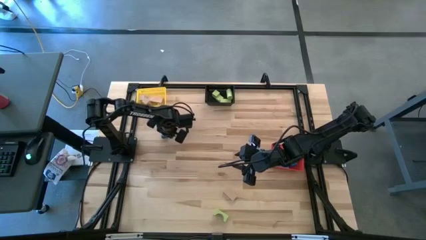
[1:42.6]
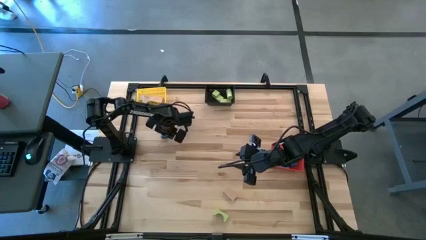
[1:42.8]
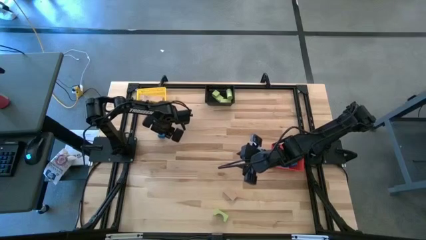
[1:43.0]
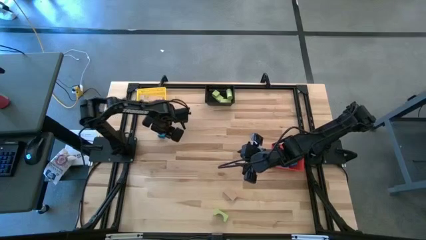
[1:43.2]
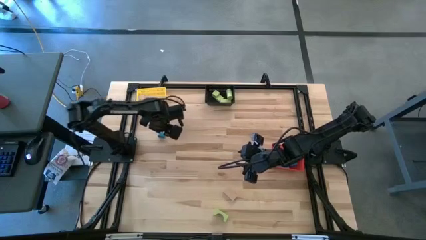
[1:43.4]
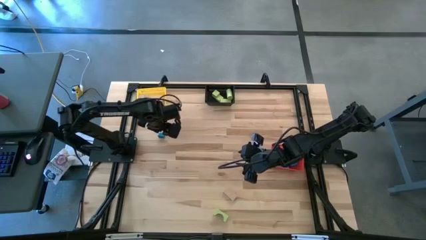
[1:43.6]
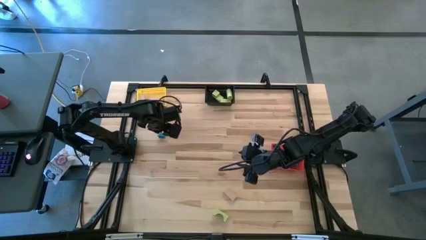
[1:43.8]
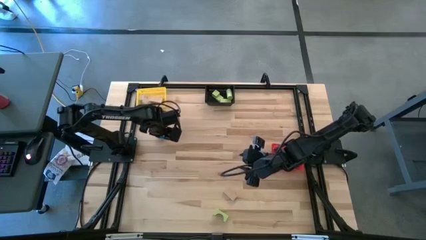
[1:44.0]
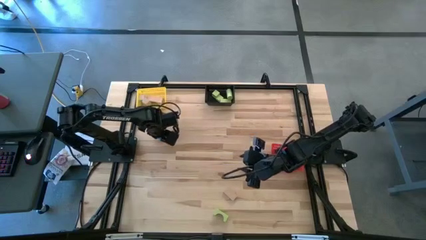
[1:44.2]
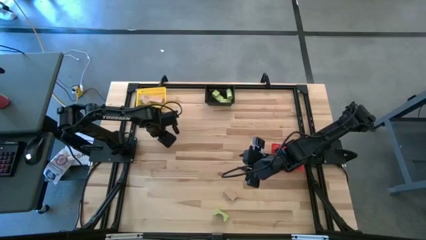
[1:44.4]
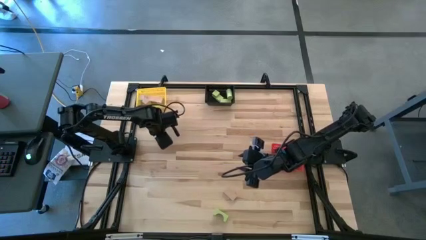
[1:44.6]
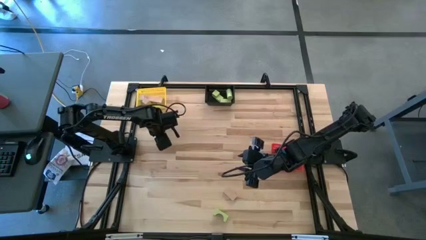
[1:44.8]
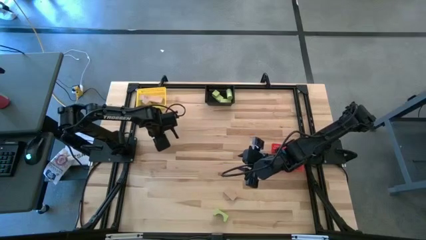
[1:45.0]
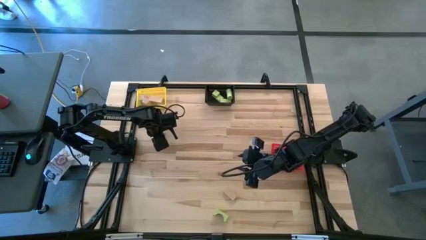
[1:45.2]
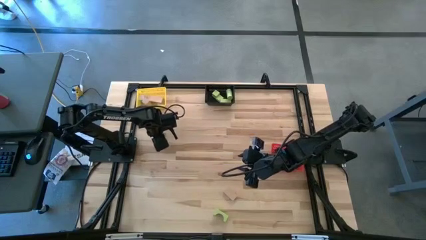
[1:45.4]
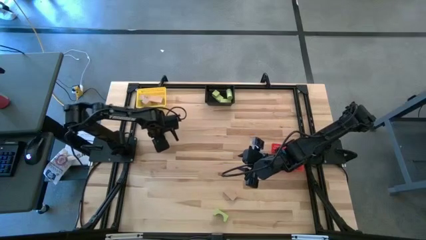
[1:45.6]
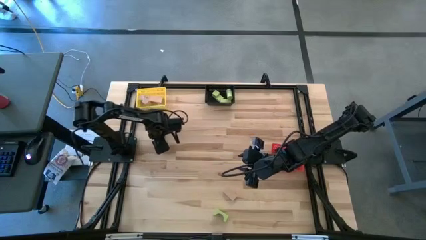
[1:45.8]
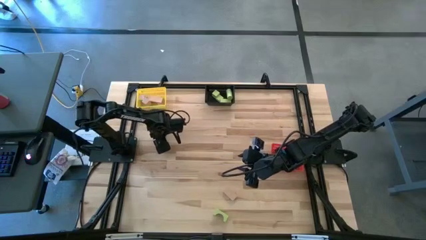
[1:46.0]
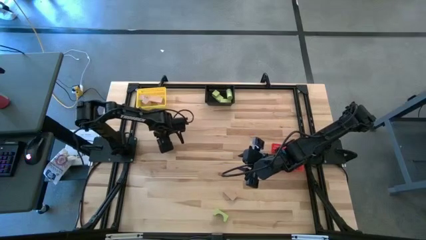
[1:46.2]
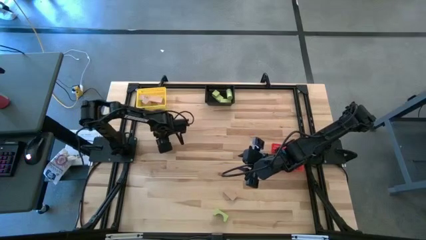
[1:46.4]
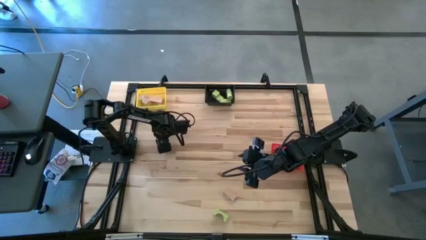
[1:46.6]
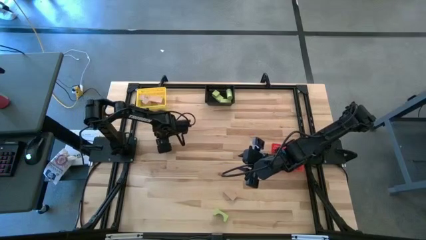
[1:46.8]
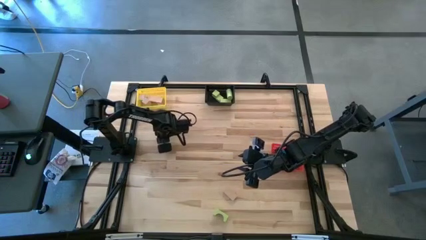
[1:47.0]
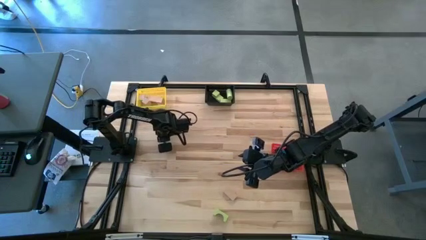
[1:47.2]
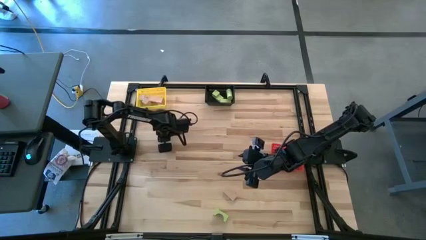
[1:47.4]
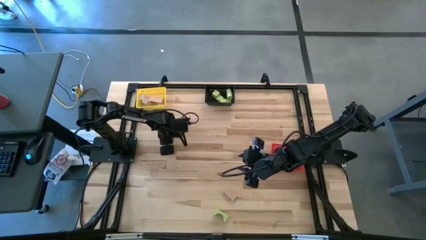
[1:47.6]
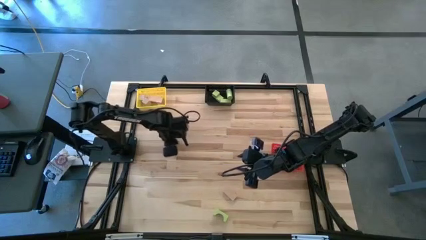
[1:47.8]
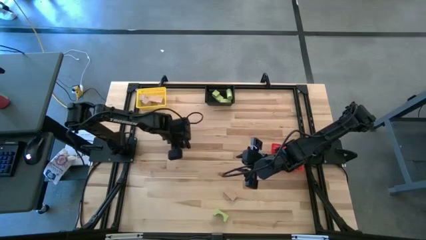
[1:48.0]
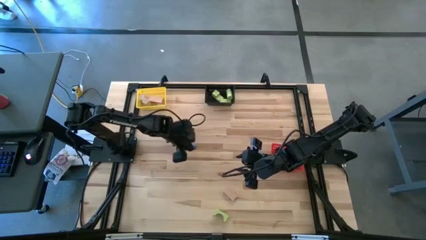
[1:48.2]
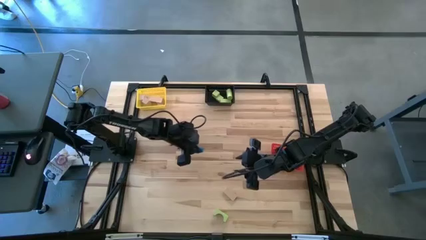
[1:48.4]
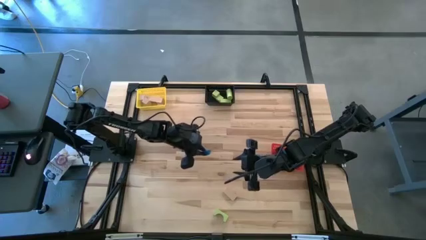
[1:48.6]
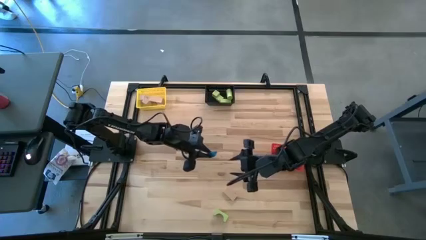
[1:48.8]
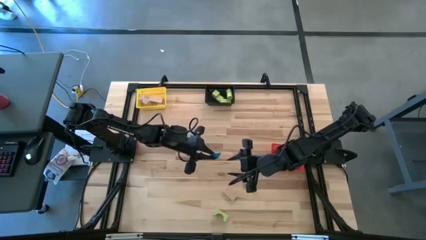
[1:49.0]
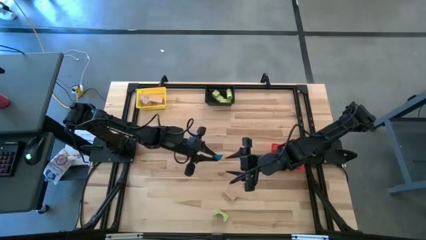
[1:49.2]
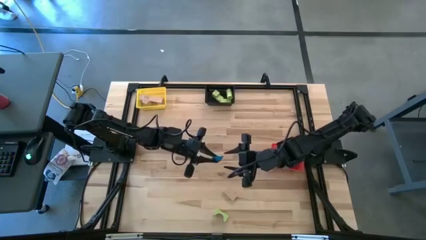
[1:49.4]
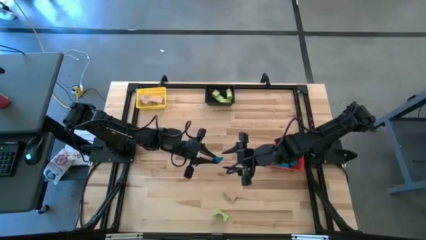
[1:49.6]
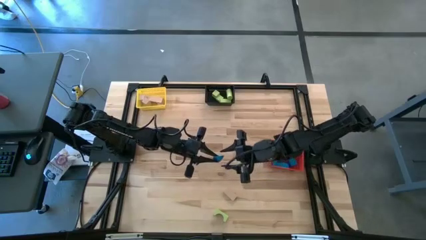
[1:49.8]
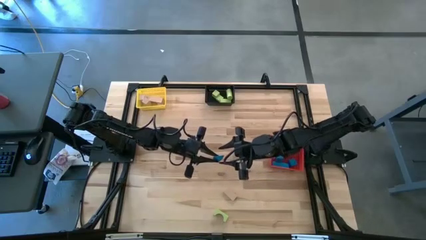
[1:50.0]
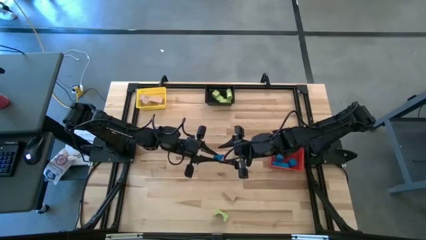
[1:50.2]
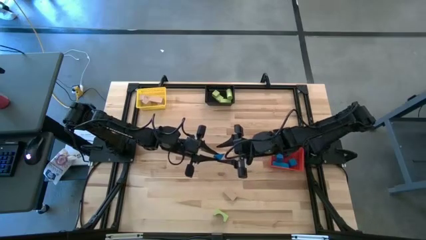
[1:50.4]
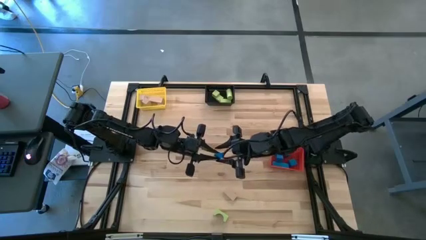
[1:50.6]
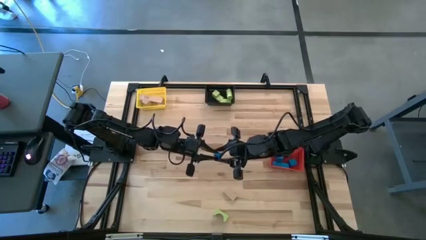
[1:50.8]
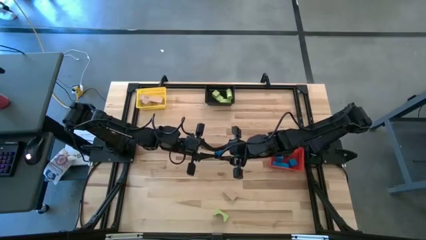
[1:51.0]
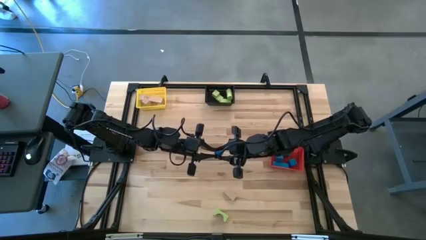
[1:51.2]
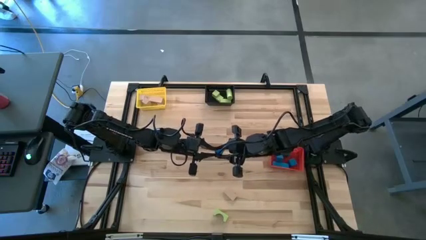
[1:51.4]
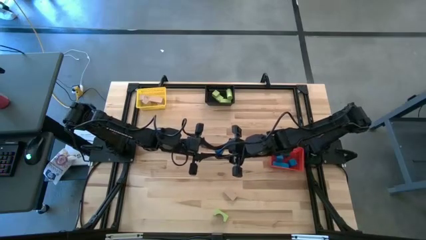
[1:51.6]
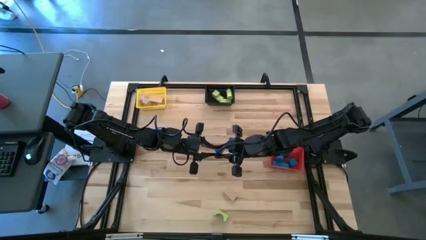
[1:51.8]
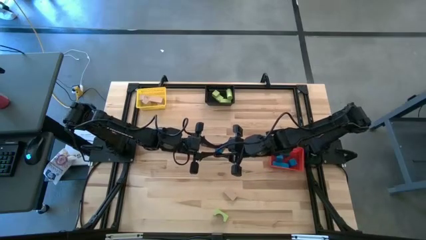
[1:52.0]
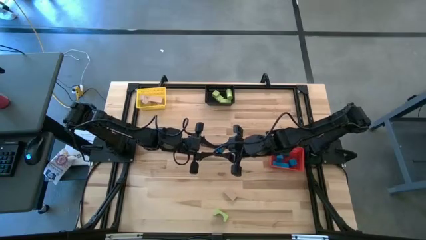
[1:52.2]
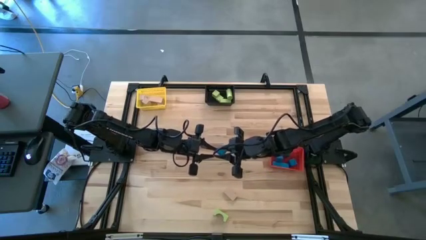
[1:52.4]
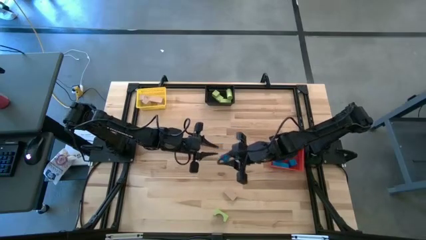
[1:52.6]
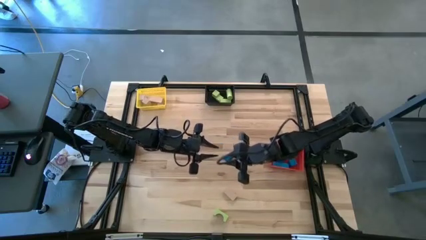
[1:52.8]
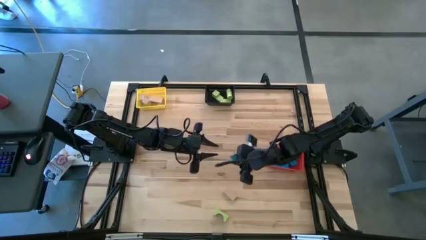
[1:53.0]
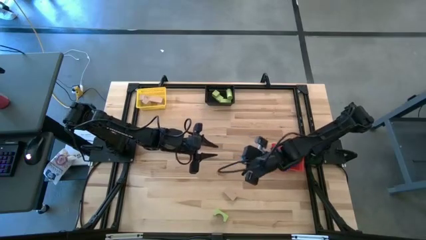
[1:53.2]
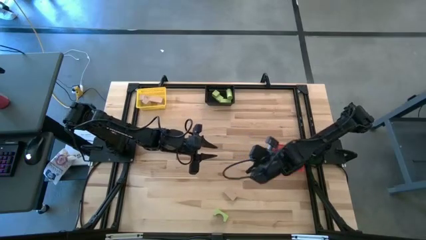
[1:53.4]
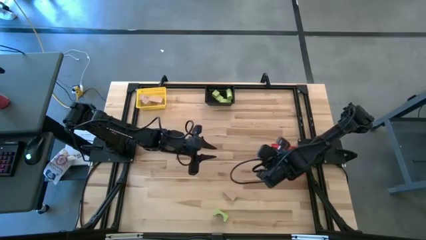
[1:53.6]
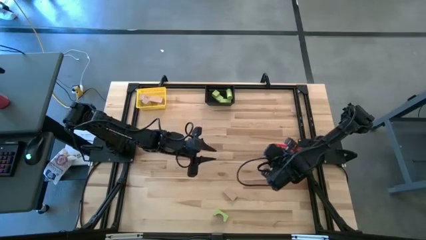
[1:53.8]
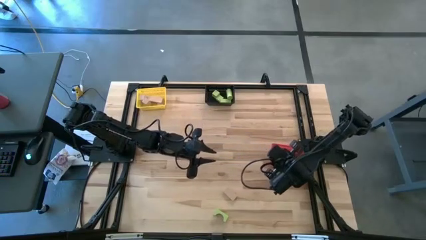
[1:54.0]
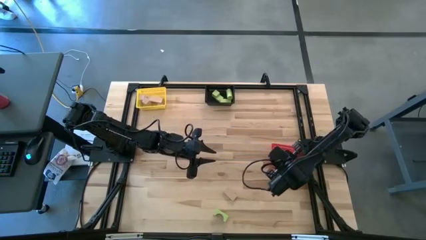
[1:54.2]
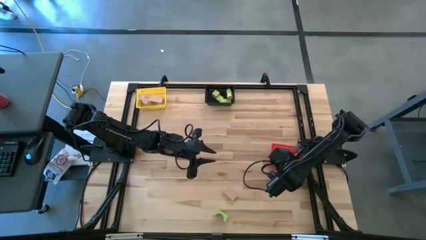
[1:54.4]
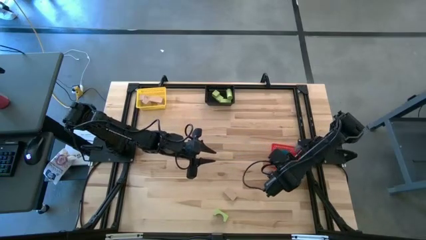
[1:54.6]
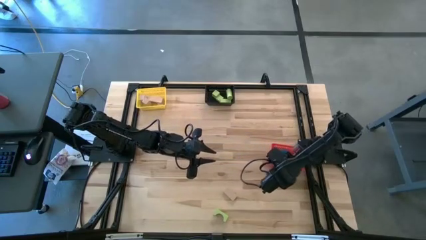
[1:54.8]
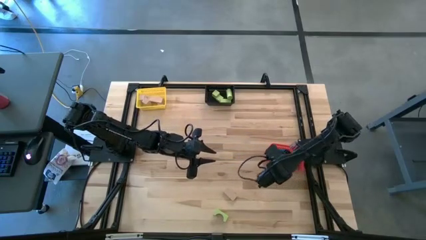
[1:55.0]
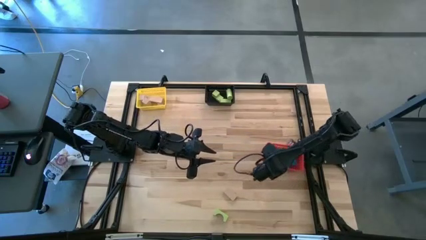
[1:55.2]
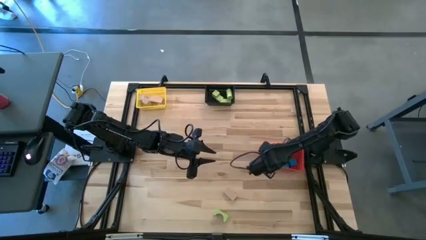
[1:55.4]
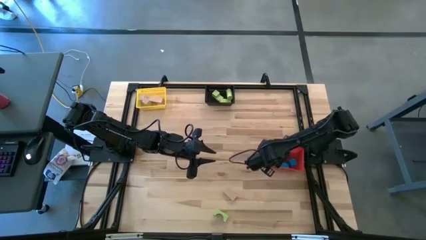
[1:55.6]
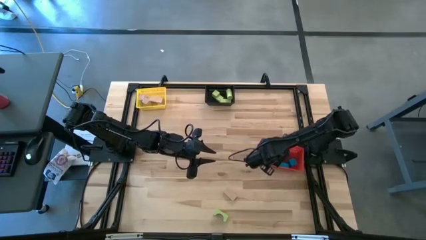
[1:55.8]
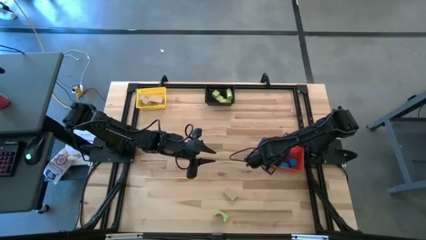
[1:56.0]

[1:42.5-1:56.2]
Task: Sort & place blocks by color
Put the blue block into the red basket

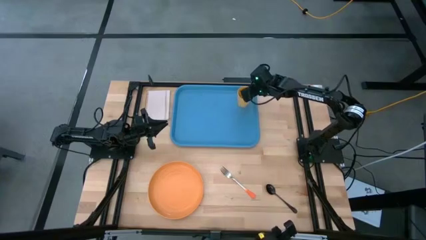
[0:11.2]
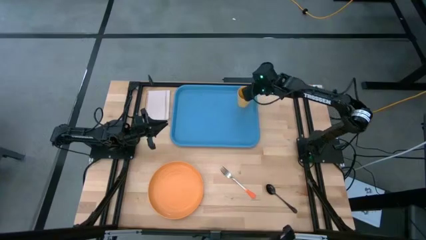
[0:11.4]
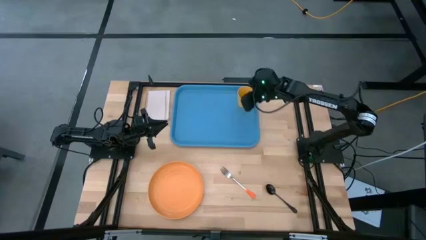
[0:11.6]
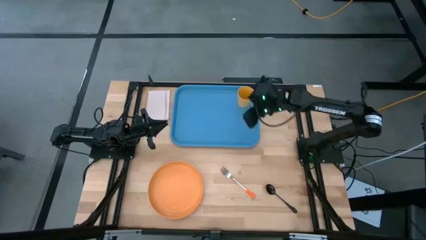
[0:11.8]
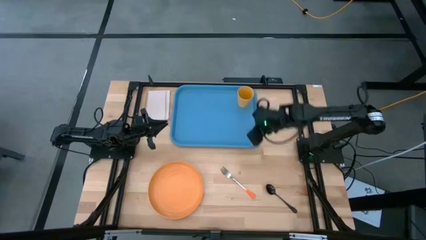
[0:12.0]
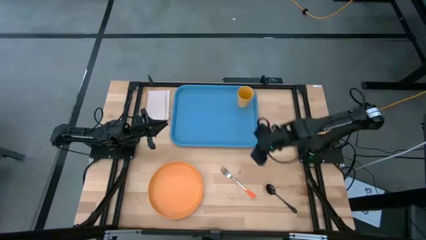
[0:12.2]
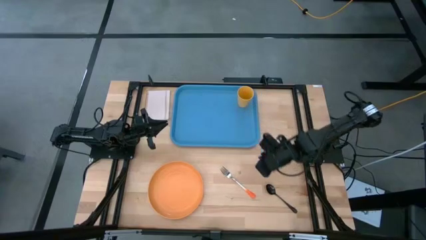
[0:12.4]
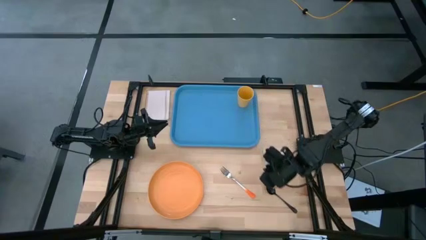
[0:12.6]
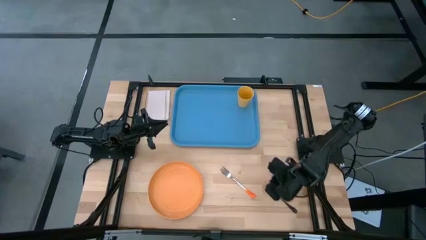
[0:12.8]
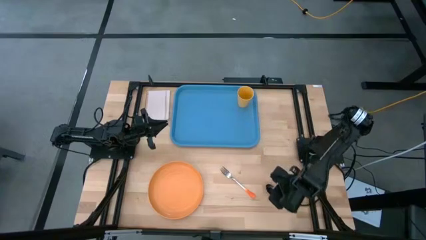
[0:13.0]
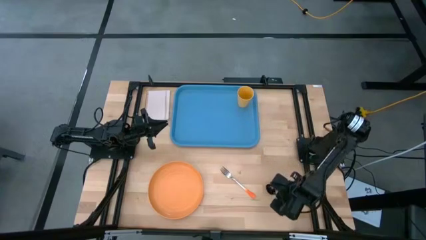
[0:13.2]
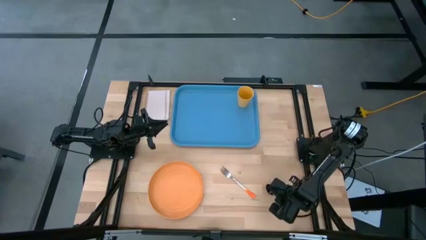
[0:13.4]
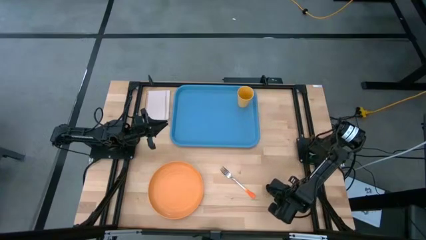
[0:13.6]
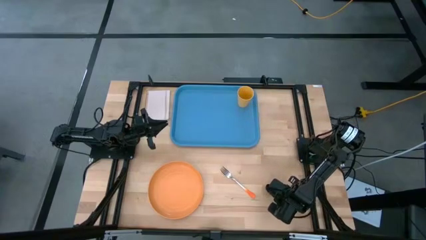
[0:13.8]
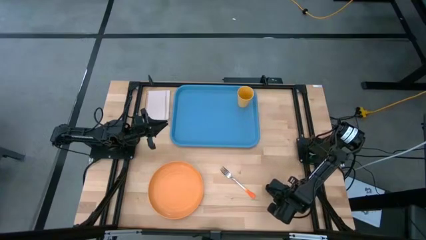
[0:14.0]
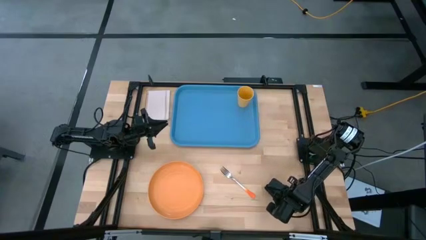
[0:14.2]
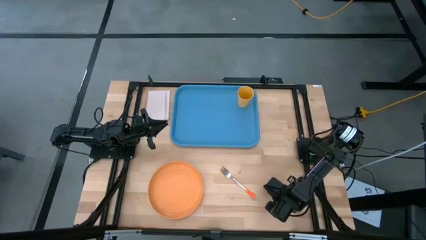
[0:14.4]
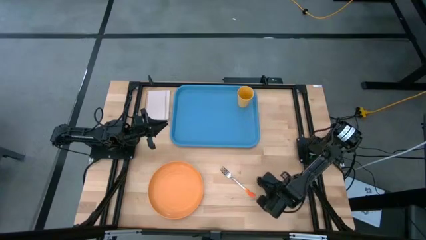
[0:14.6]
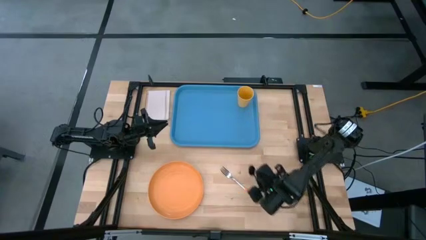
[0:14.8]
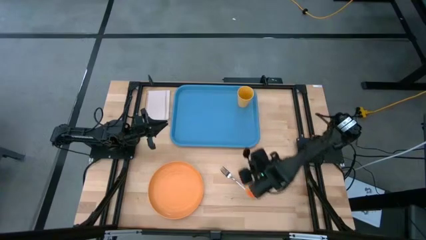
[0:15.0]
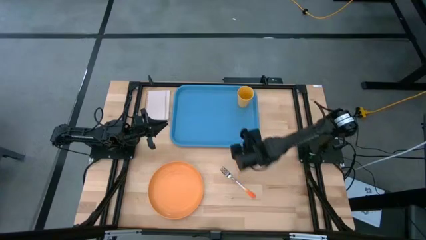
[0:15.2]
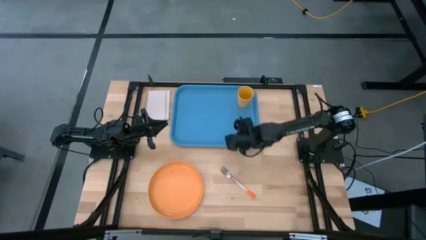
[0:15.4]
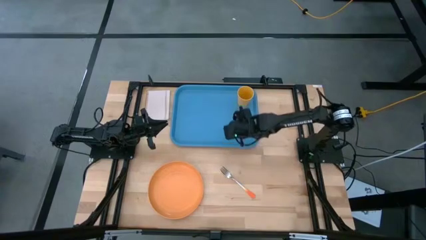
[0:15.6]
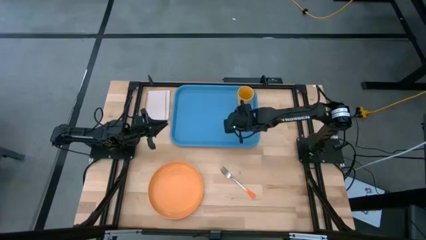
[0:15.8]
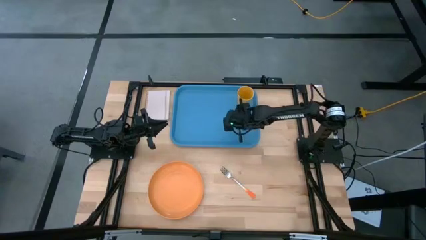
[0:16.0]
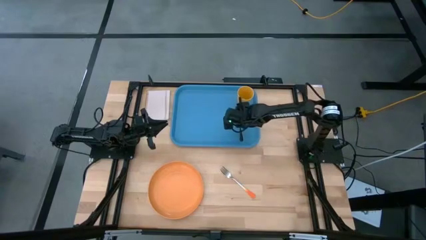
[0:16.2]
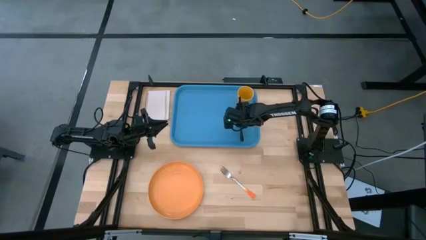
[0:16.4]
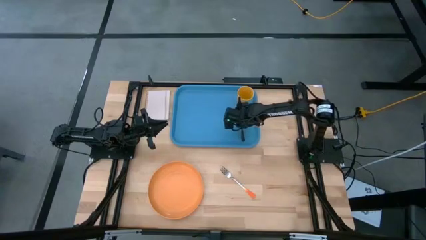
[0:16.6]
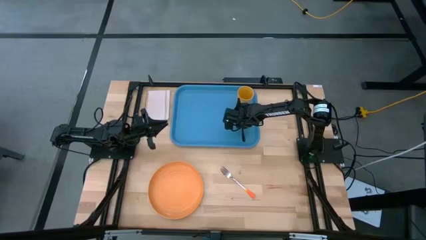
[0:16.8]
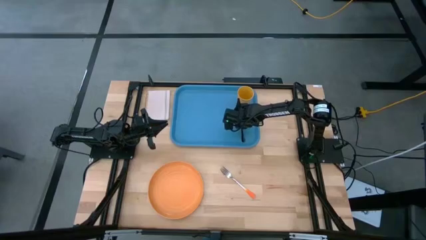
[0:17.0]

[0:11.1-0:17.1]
Task: Pick and place plate/cup/fork/spoon on tray
Put the black spoon on the blue serving tray to the bottom of the yellow cup
